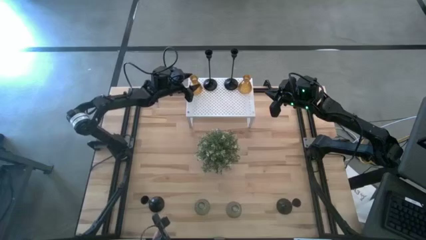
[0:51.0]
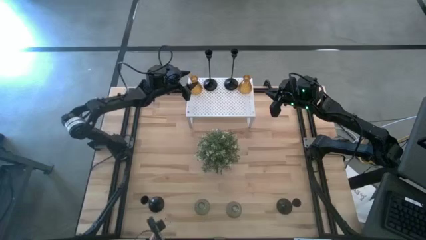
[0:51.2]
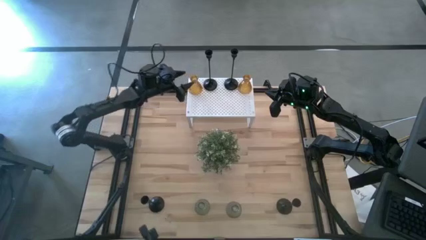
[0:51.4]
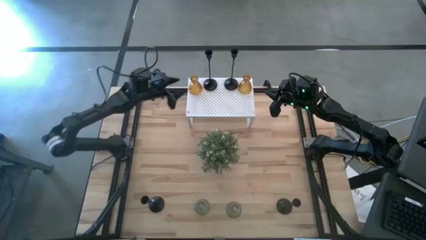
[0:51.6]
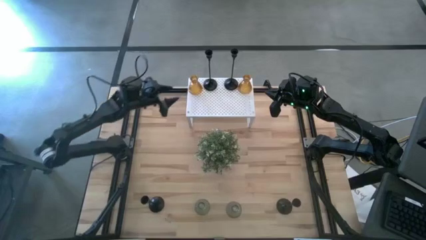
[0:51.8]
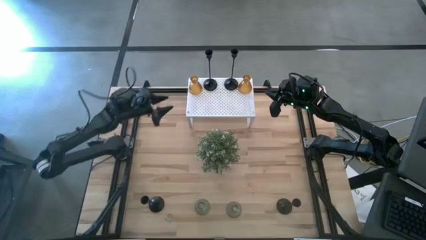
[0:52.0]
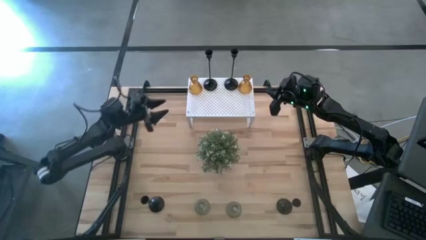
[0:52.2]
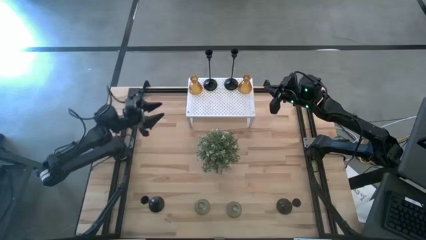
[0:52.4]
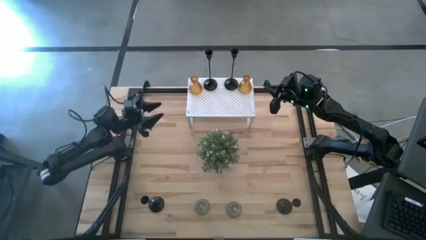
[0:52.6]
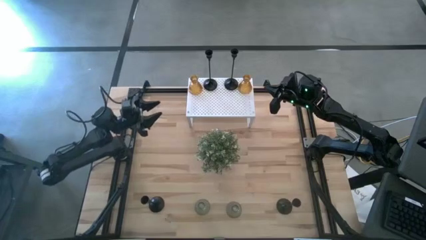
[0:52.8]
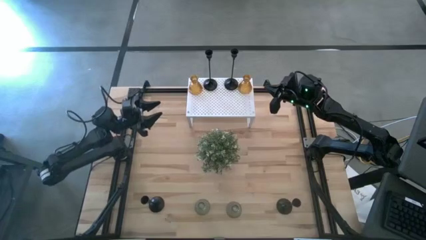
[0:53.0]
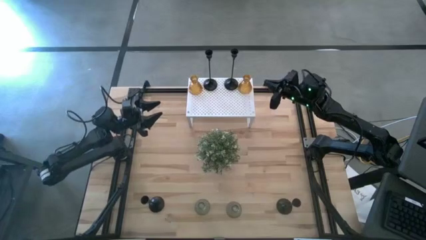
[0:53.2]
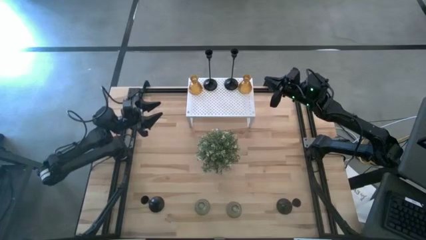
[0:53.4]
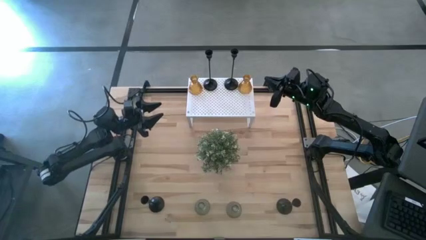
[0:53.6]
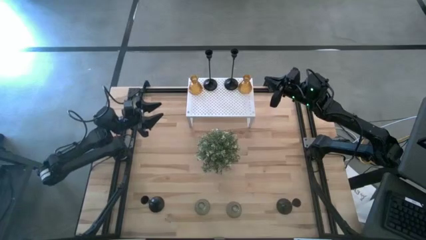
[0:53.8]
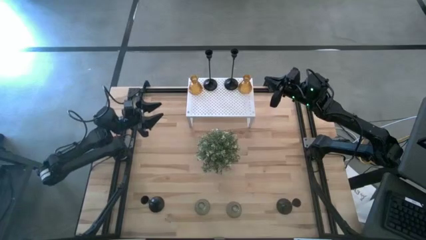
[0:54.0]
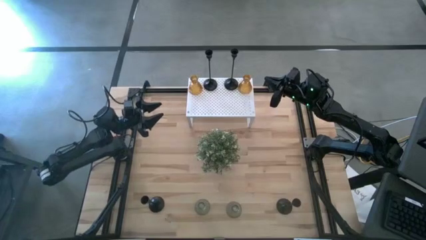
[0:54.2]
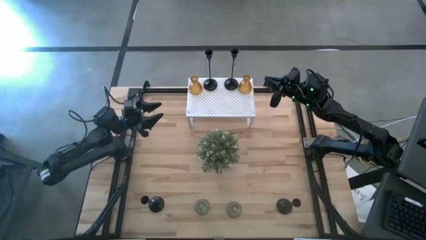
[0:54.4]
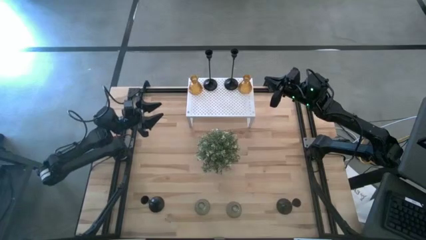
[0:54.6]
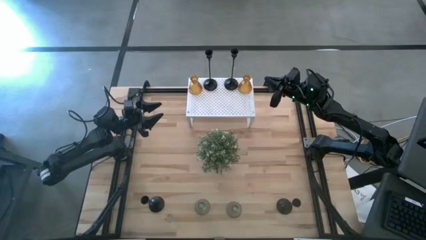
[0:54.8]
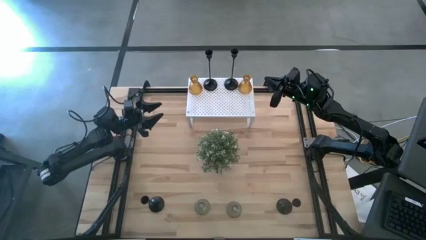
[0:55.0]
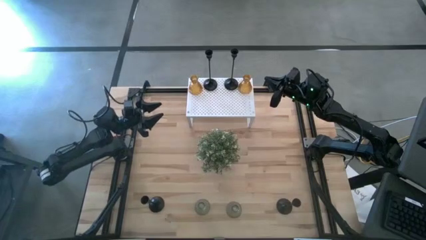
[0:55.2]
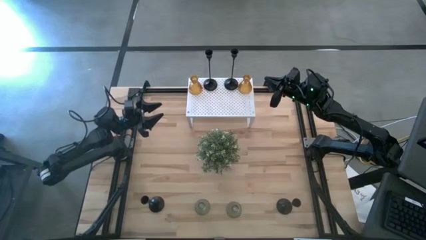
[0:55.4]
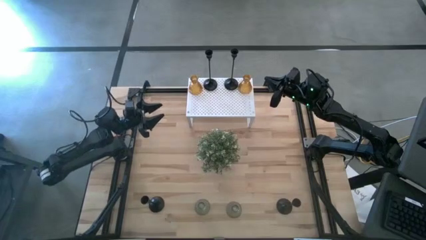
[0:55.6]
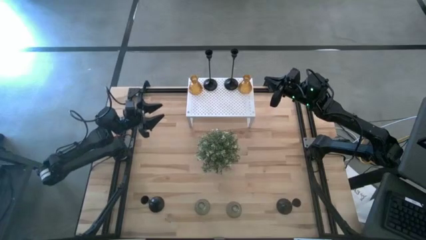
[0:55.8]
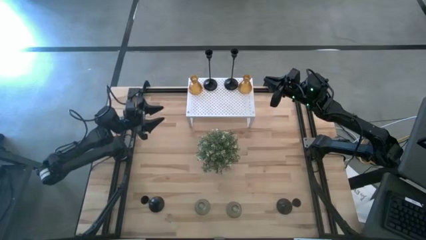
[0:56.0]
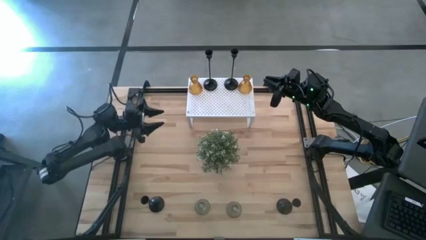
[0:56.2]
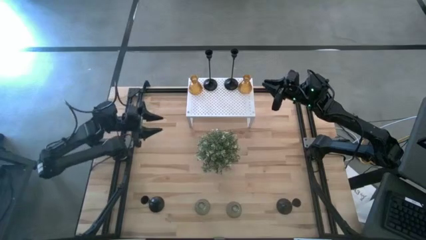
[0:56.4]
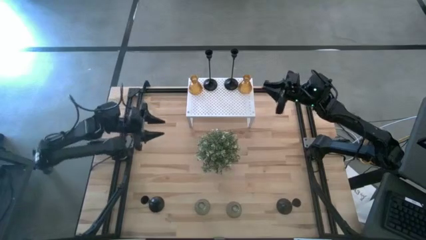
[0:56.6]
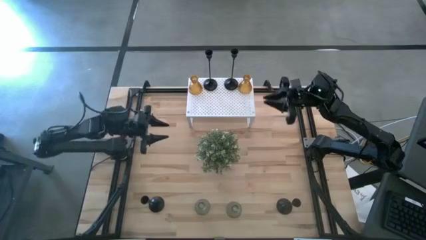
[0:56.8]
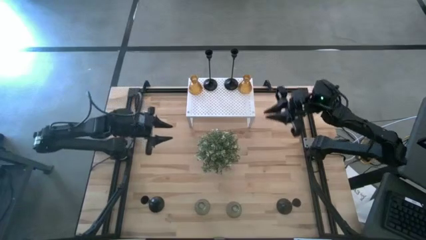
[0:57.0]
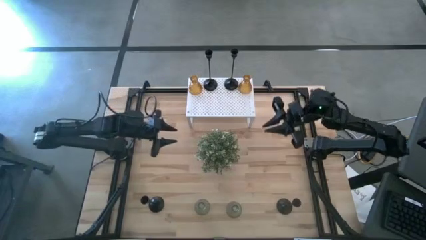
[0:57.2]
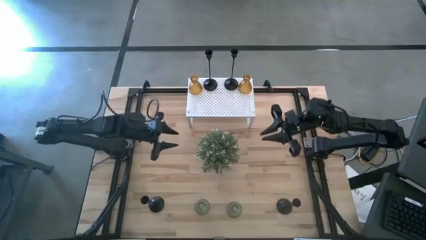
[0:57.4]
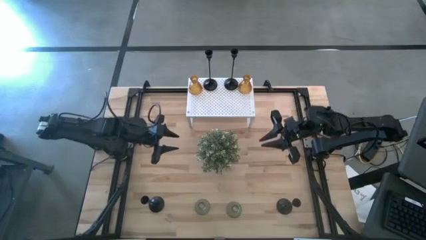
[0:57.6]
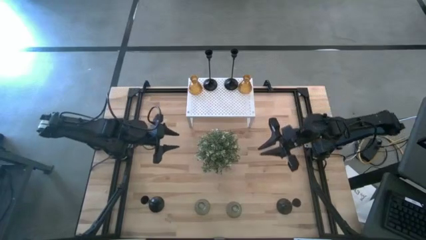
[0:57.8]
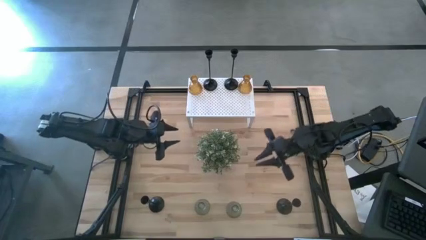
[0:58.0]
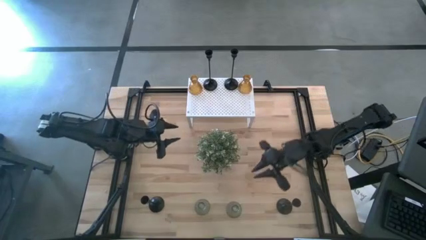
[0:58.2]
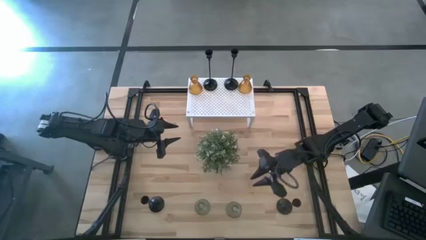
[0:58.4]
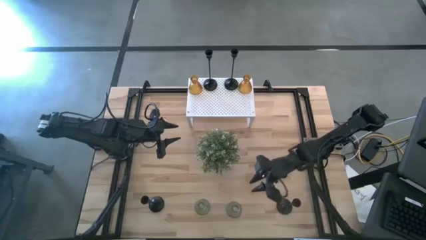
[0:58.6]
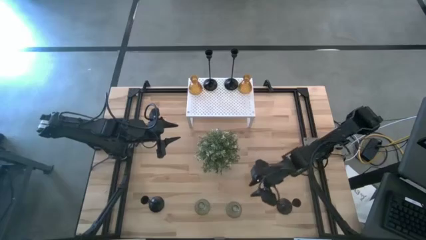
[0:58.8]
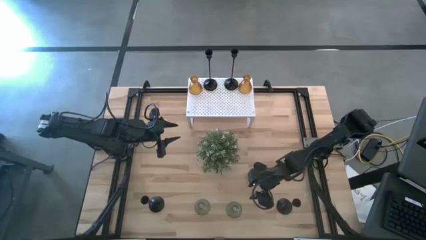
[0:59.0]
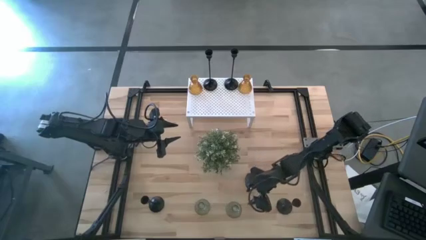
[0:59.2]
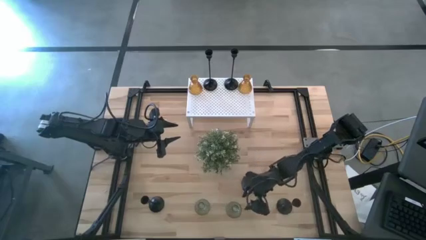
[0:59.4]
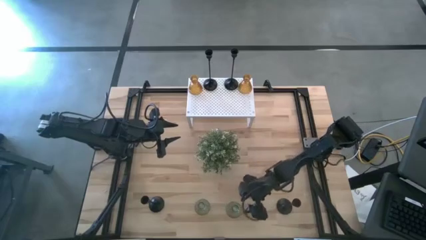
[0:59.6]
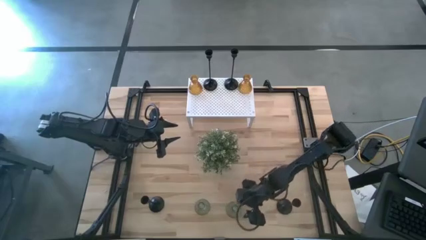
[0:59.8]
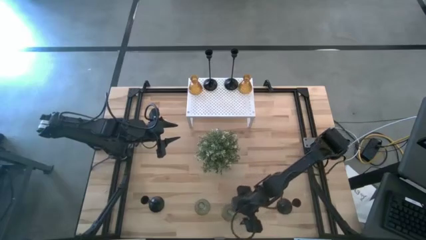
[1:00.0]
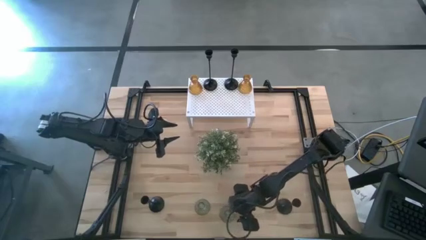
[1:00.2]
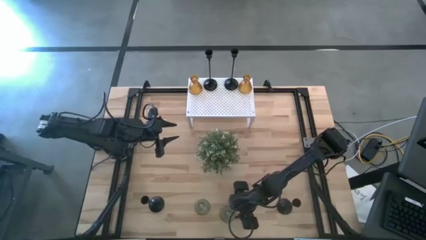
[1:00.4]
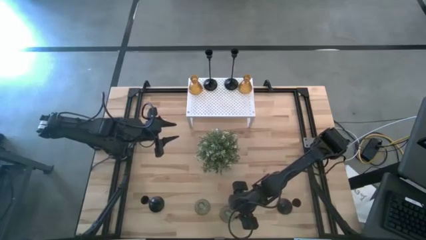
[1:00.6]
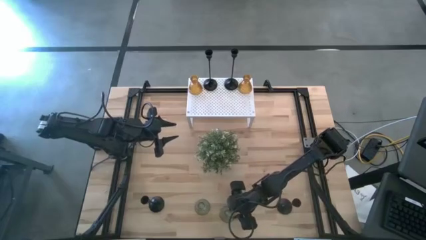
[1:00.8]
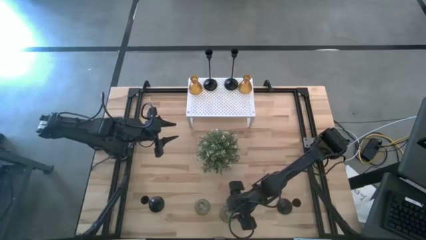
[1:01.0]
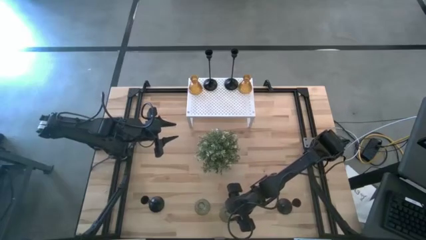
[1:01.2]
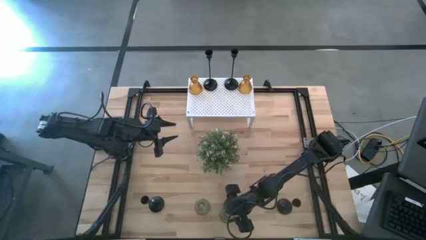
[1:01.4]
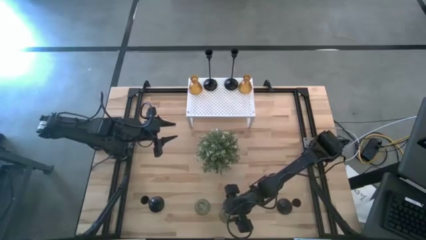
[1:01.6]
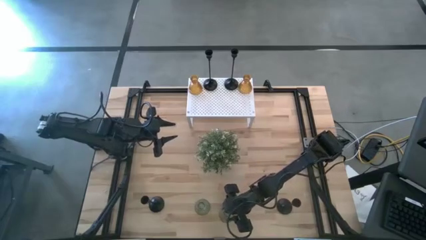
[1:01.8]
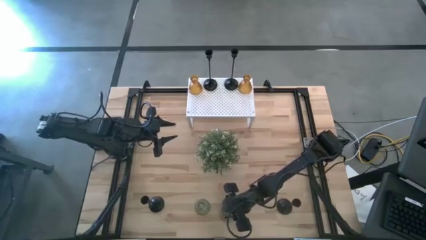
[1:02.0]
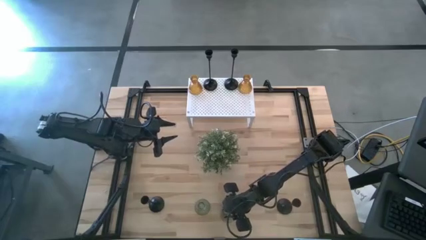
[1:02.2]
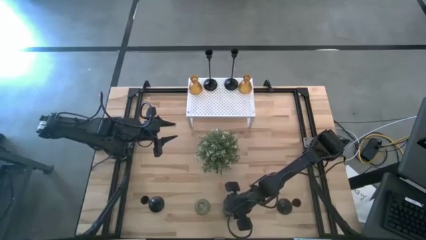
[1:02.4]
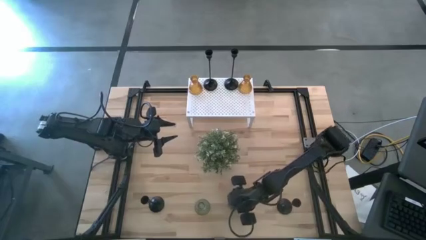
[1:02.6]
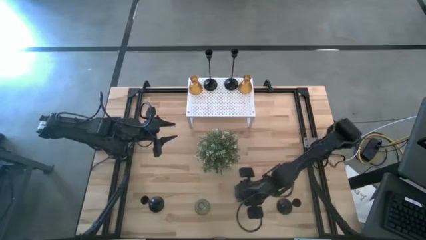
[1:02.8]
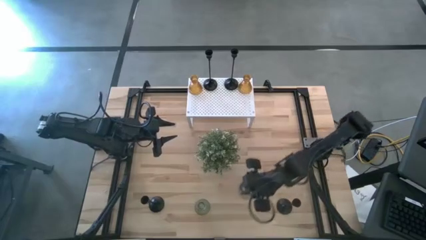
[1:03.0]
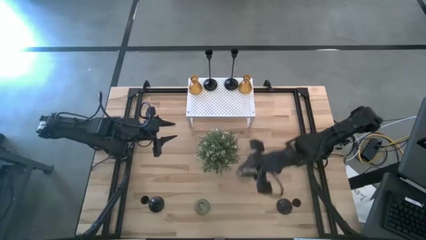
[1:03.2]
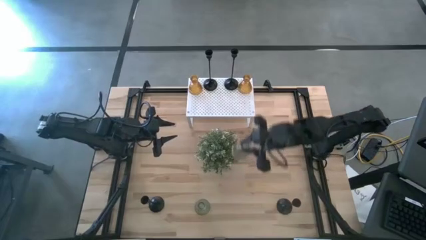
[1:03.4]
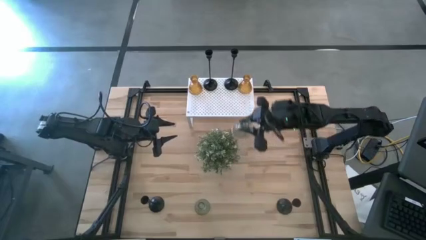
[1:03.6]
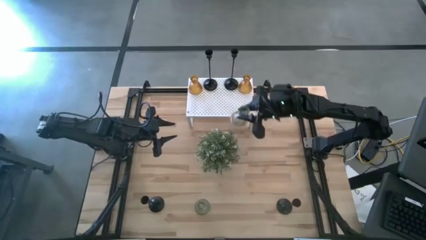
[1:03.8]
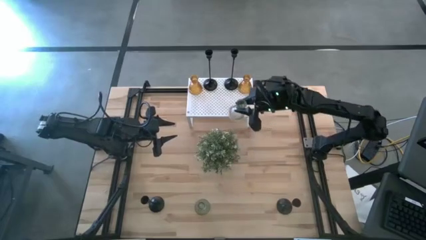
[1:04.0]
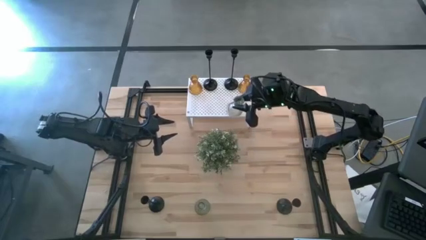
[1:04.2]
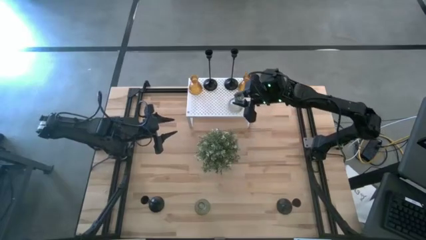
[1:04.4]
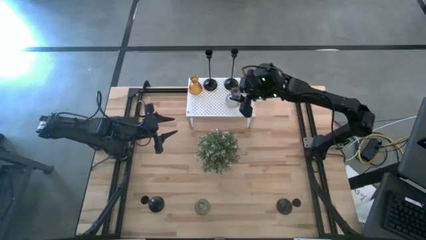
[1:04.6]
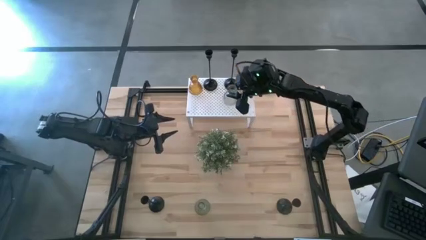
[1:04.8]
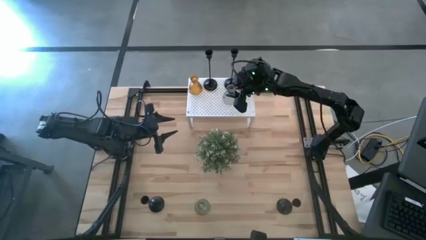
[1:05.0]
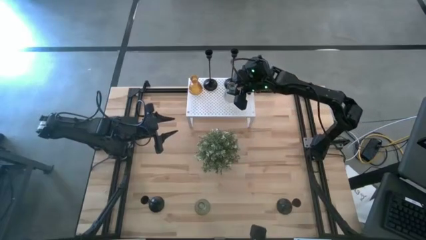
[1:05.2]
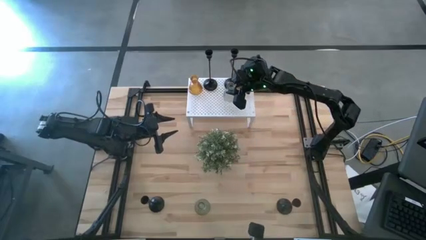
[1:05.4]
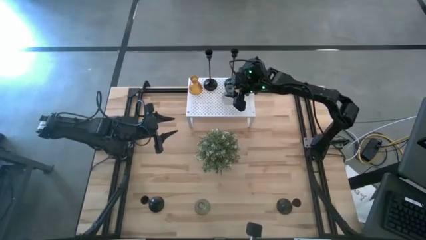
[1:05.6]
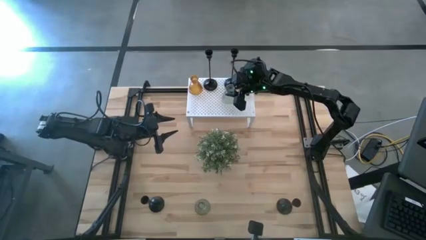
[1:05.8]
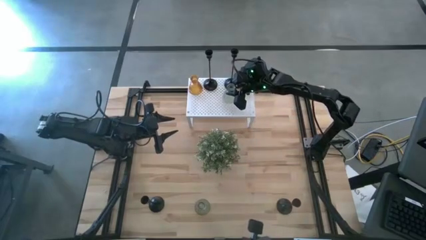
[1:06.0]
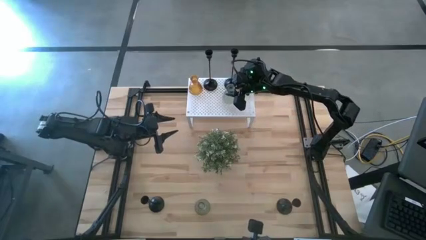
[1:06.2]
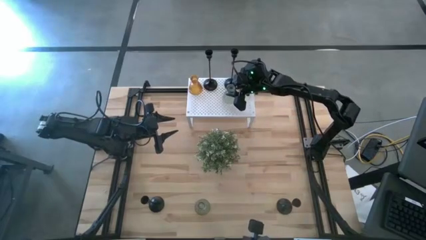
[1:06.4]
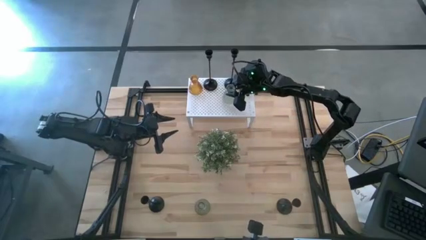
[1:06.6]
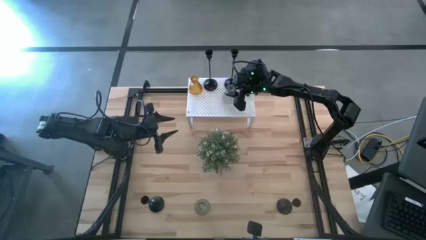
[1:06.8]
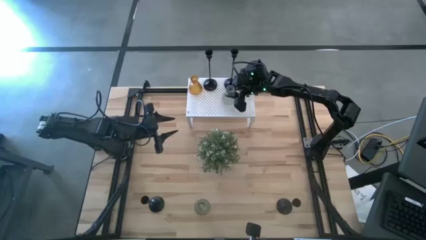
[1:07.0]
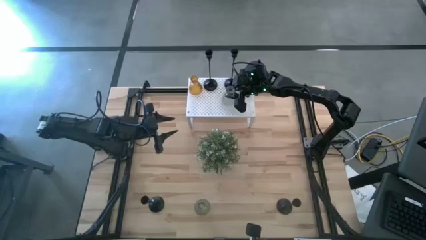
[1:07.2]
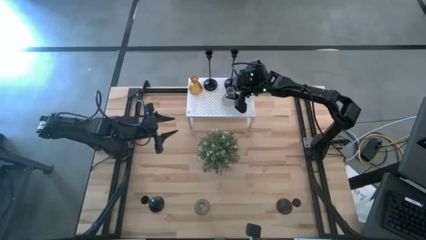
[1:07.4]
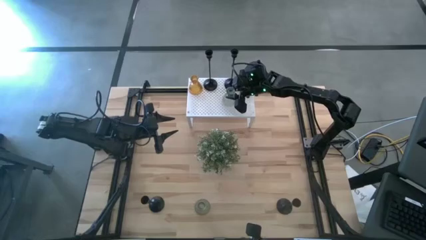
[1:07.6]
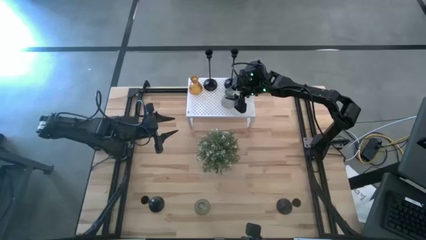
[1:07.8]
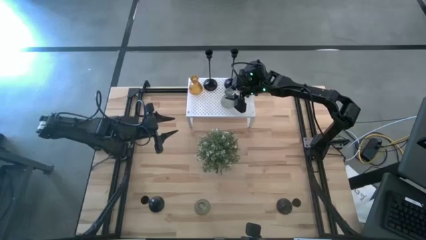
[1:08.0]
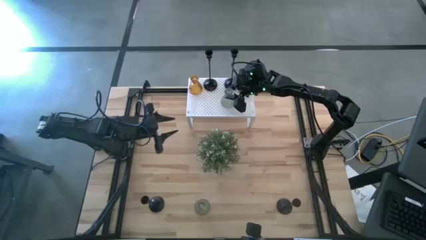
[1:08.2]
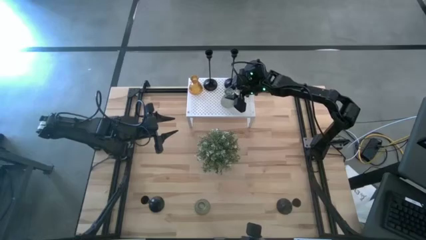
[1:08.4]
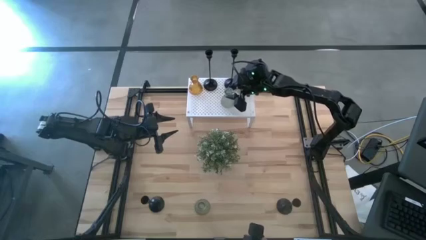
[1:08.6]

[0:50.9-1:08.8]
Task: Pick & Place candle stick holders
Put the right green glass candle holder on the shelf
